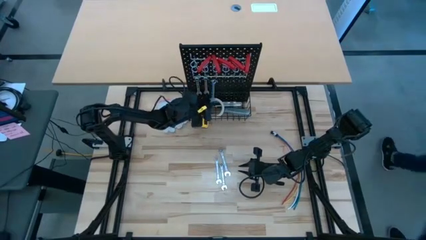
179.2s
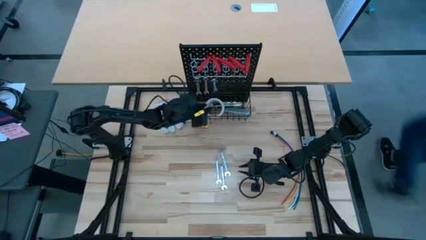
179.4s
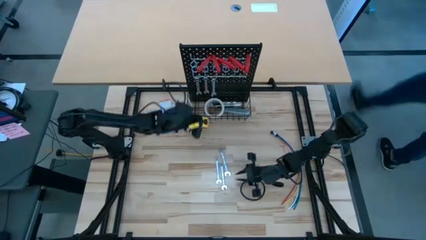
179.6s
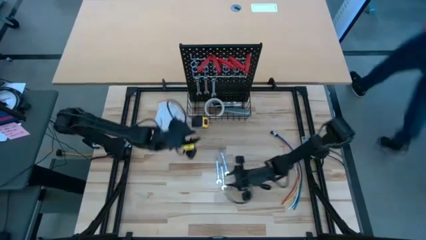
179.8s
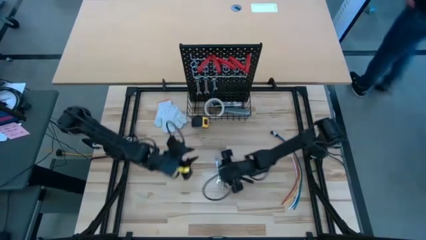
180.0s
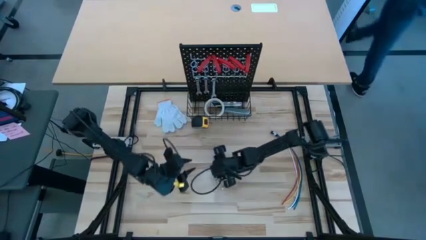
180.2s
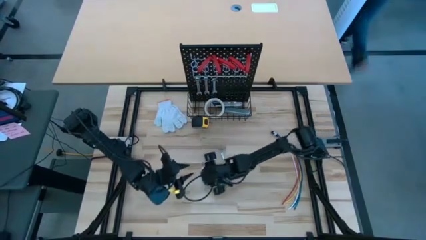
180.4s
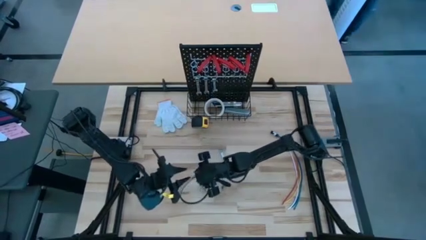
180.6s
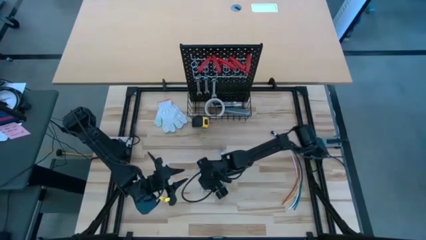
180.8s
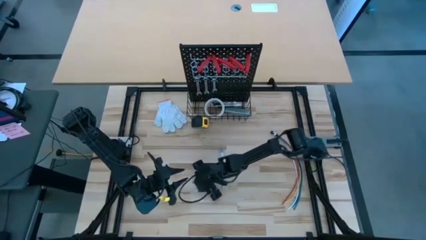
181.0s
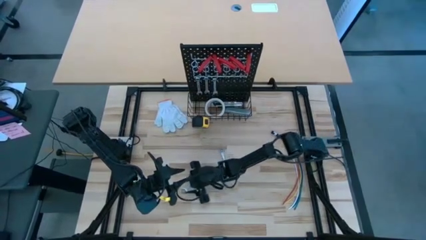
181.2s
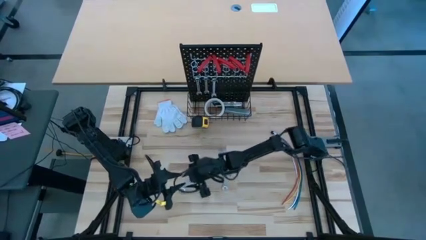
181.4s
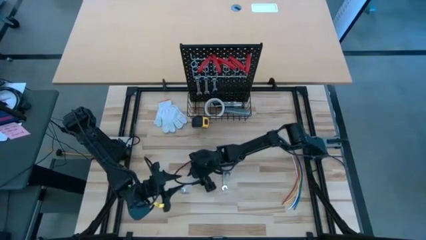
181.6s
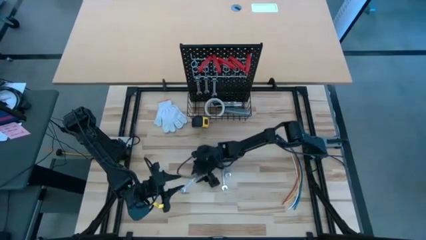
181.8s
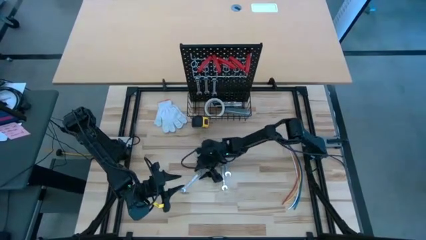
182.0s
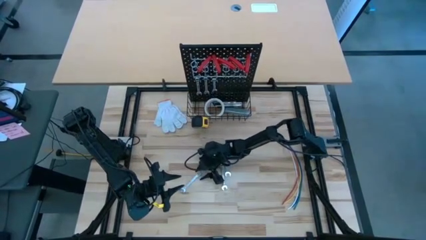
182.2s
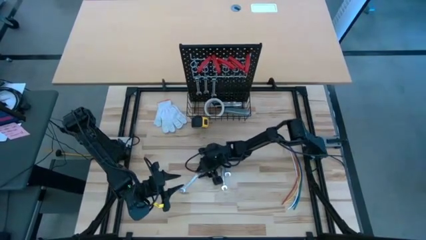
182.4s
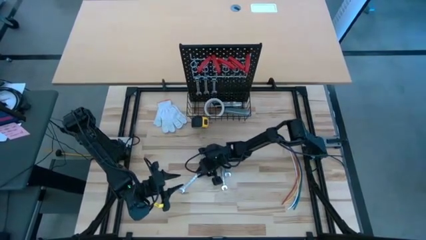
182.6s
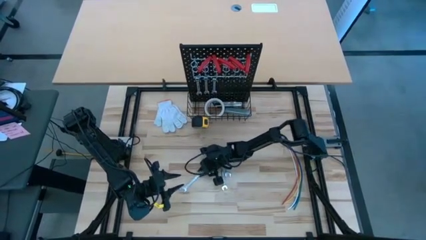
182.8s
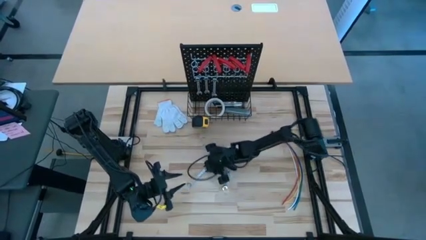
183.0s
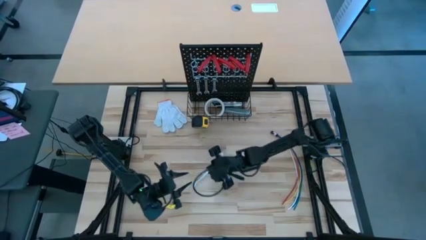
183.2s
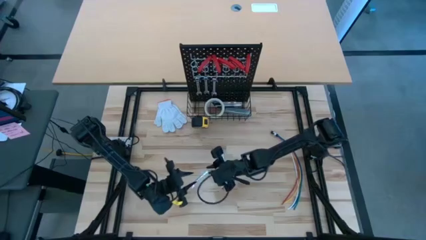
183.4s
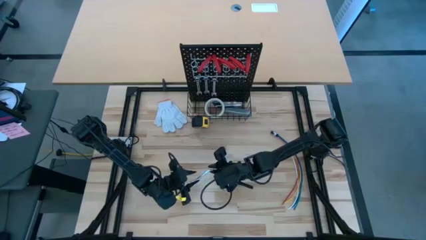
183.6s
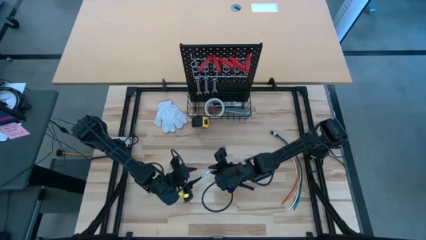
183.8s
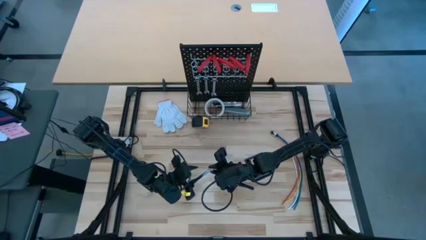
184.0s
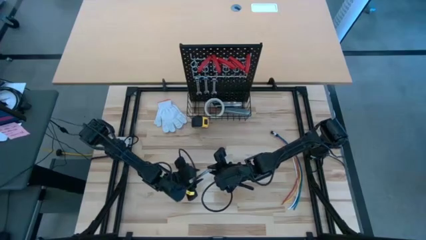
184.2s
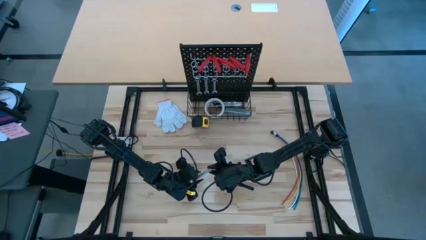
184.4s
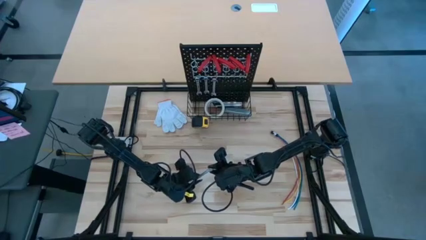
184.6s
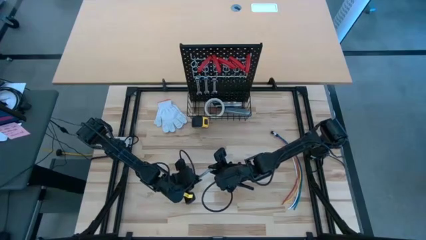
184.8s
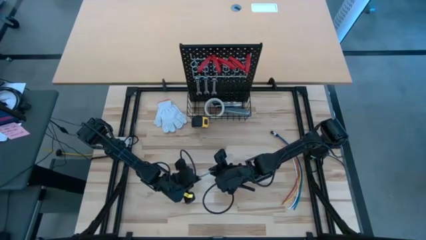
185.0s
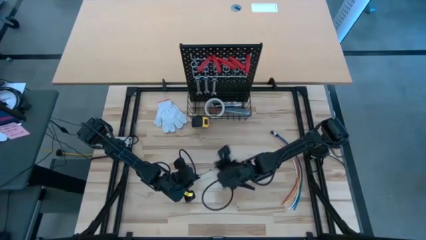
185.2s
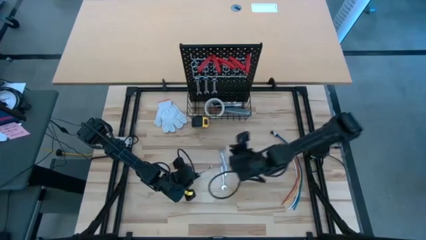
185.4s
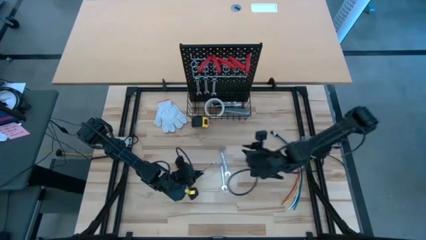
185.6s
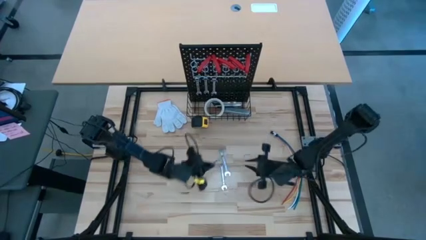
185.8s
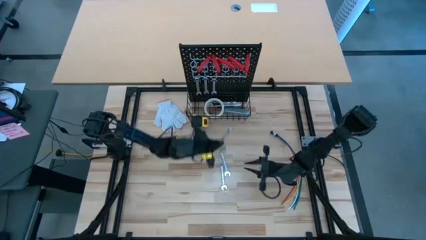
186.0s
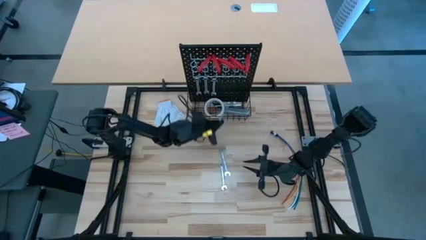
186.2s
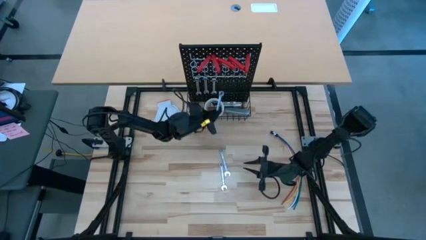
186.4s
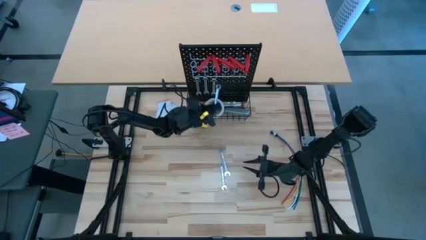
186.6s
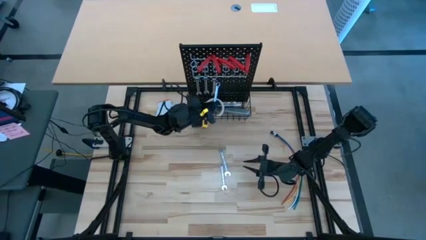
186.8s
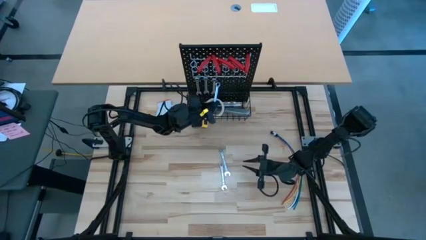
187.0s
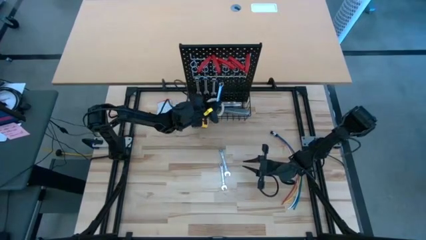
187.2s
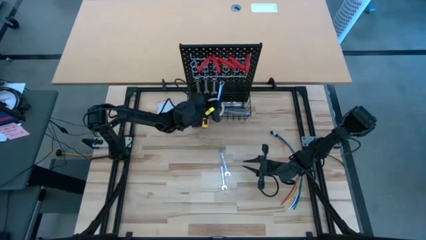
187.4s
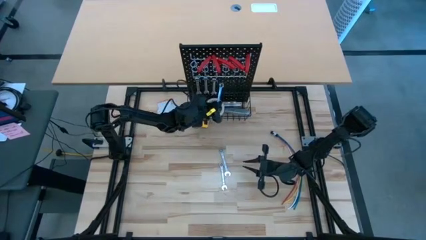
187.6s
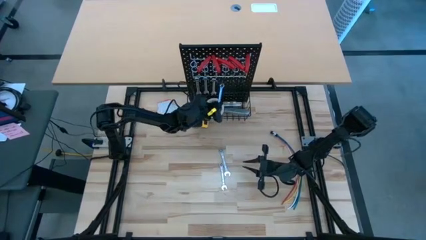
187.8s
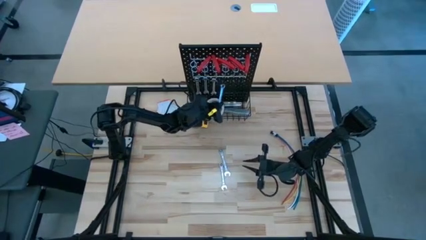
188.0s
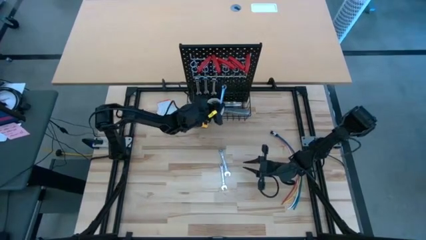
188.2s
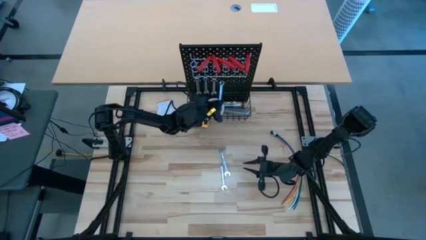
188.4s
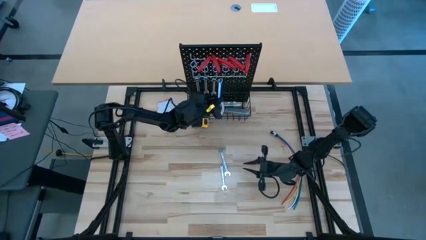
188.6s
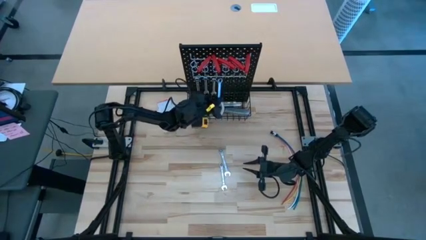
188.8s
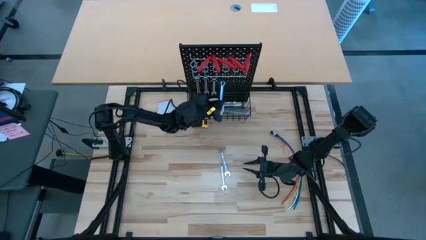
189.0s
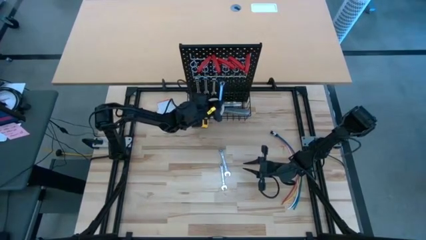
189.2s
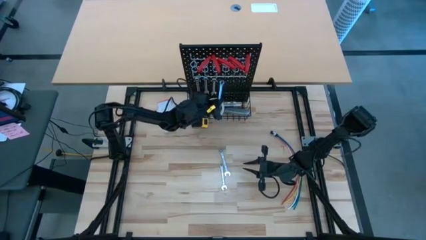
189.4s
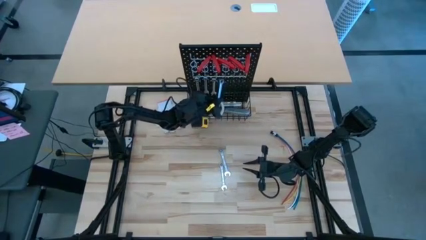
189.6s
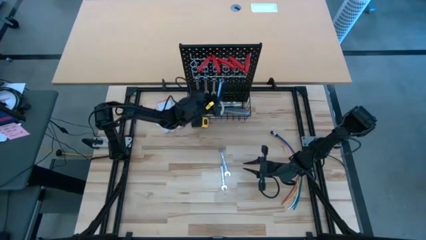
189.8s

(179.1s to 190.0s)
Task: Hang tools onto peg board
Hang the silver wrench on the pegboard

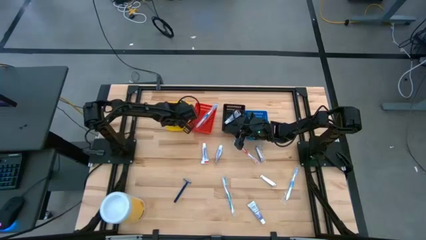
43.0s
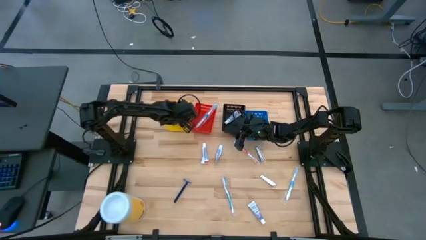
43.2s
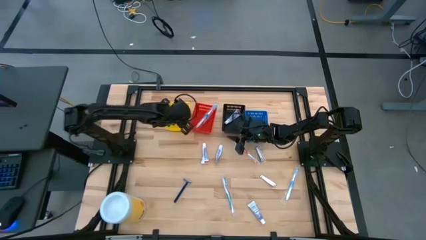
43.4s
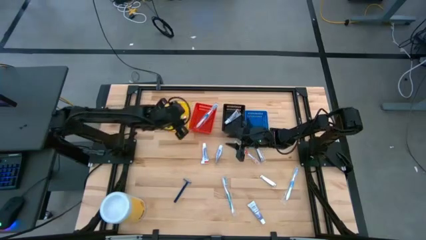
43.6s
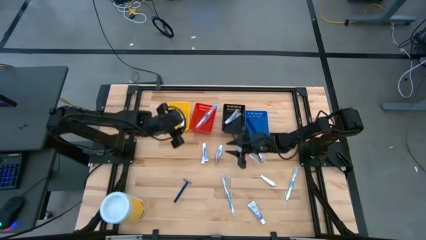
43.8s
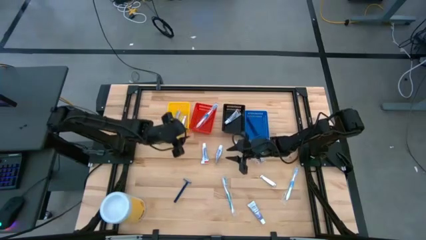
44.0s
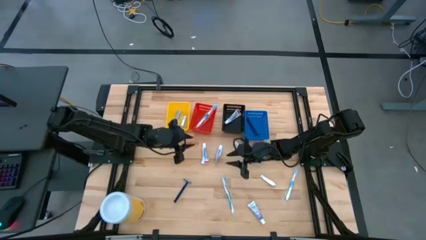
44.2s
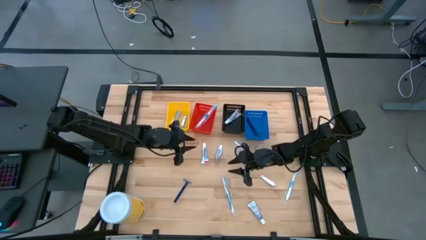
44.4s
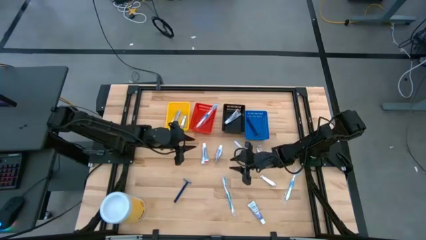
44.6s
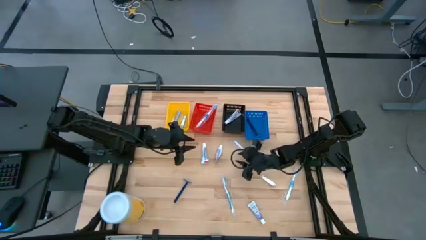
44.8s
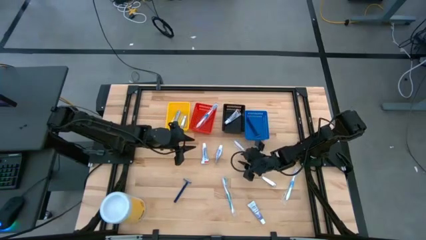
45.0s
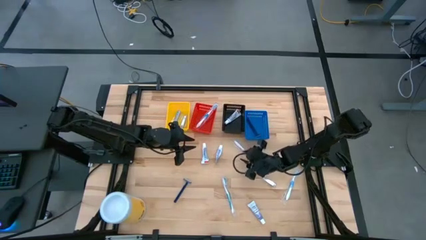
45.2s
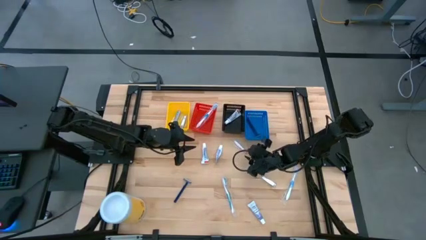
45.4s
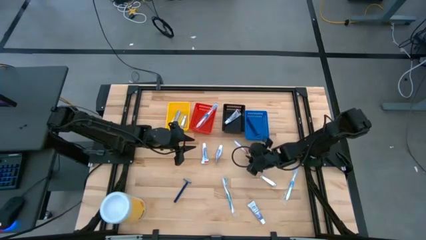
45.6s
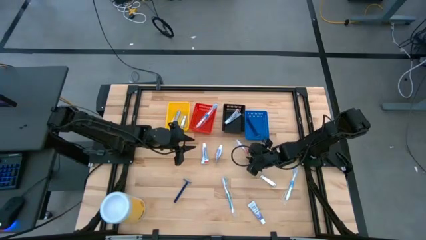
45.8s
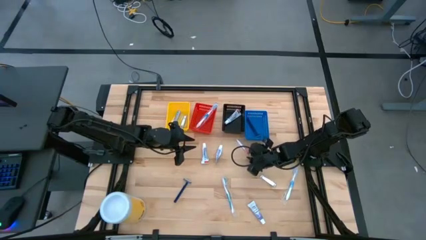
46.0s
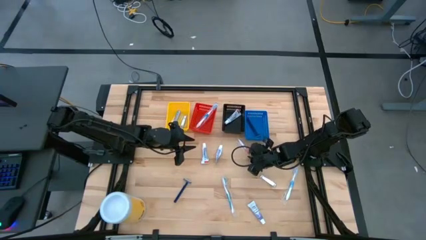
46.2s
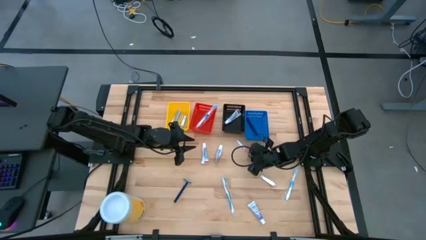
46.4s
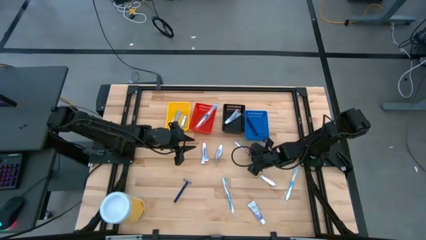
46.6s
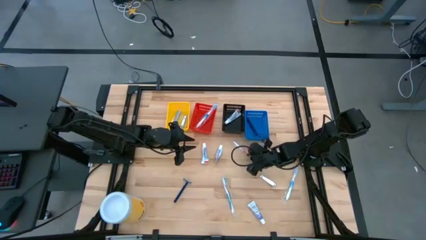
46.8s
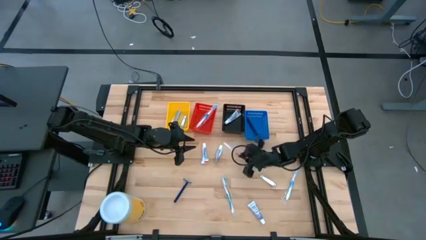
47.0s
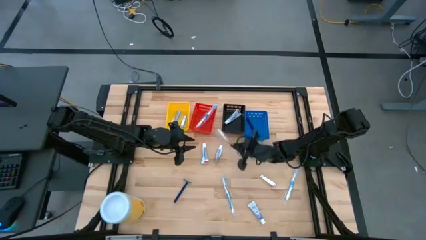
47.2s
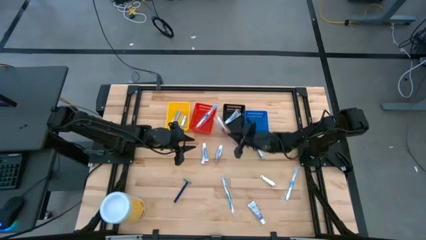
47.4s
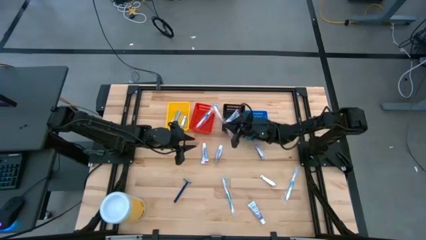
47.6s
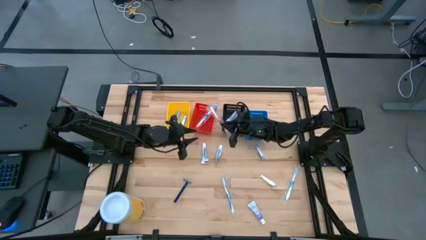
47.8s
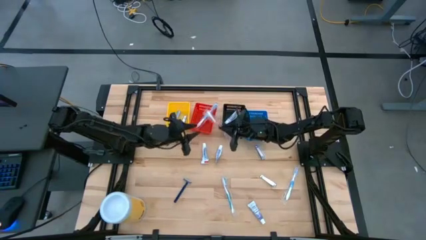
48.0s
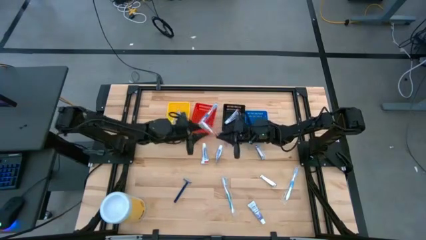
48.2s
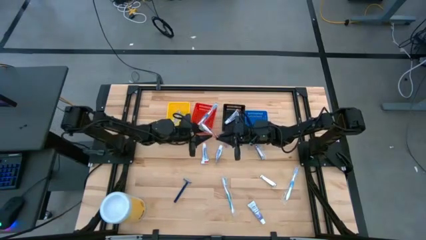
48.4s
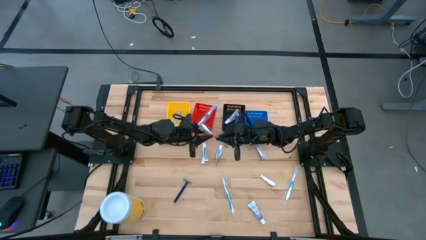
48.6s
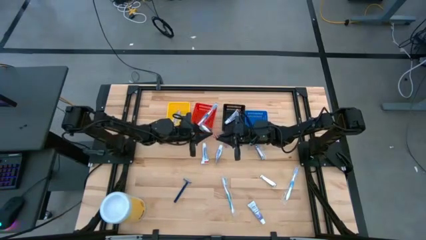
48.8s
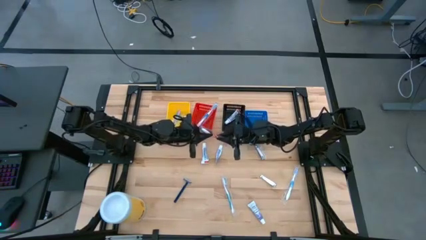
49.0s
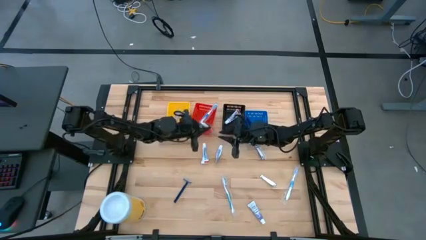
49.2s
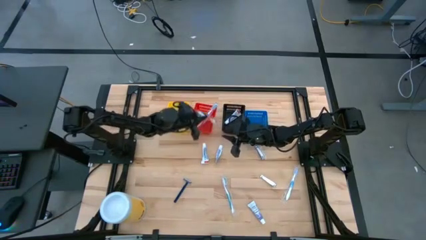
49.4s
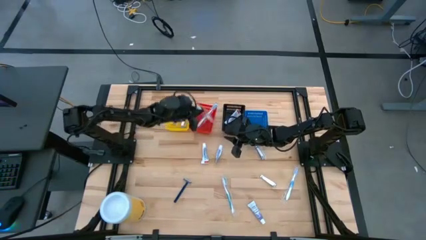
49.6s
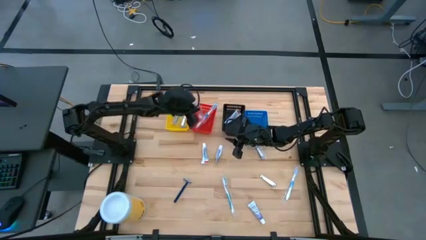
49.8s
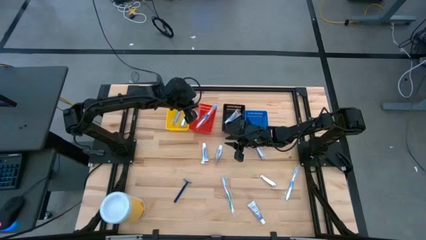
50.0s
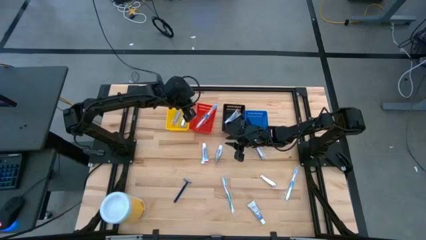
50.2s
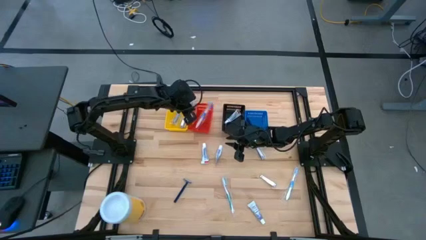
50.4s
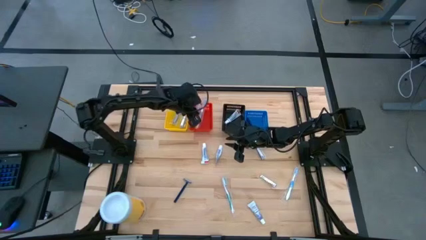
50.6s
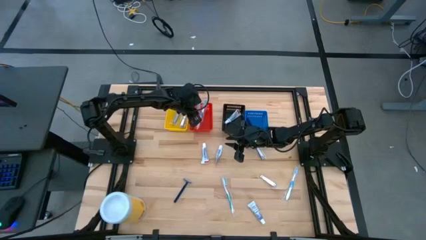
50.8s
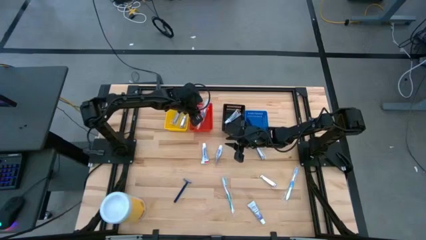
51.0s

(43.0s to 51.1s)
Task: Pick & Place Travel size toiletries
Put the orange toothbrush into the red bin
